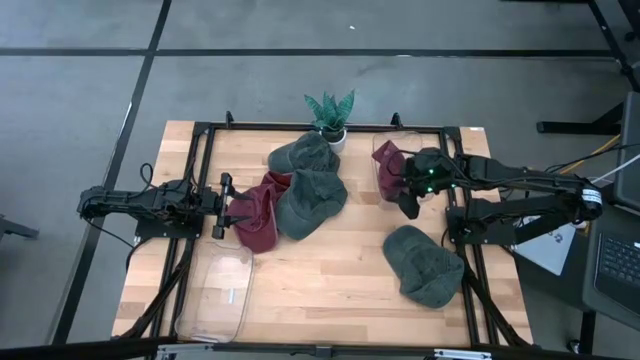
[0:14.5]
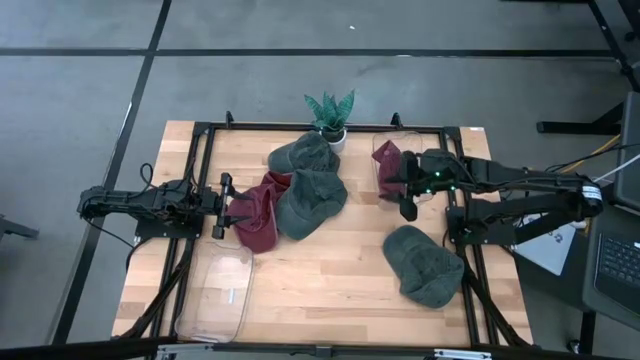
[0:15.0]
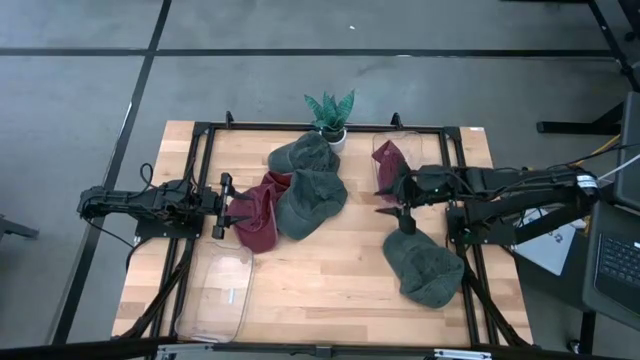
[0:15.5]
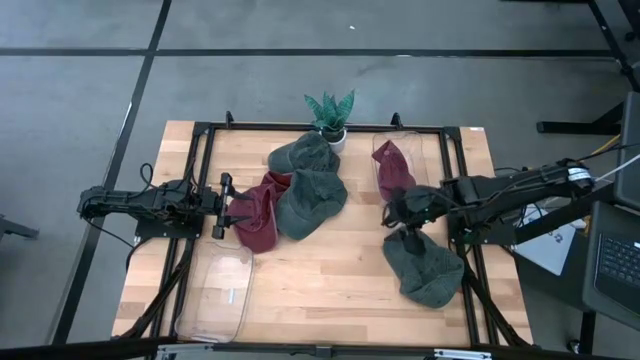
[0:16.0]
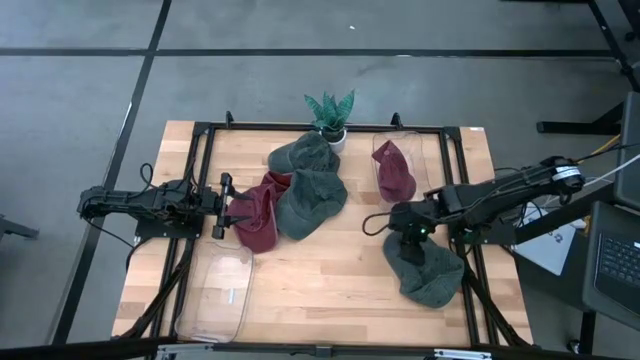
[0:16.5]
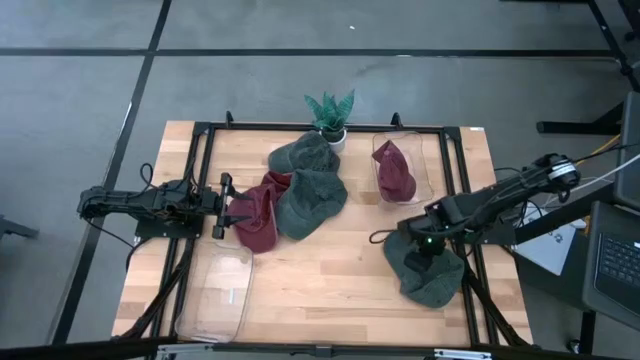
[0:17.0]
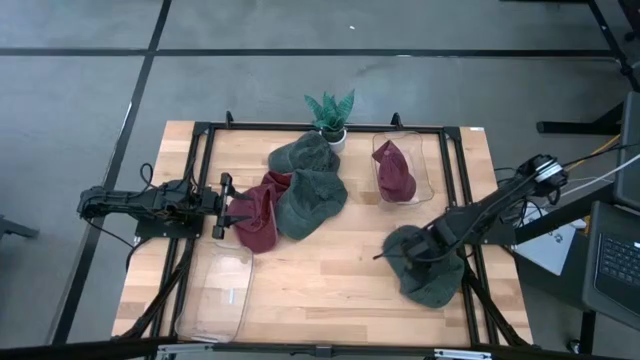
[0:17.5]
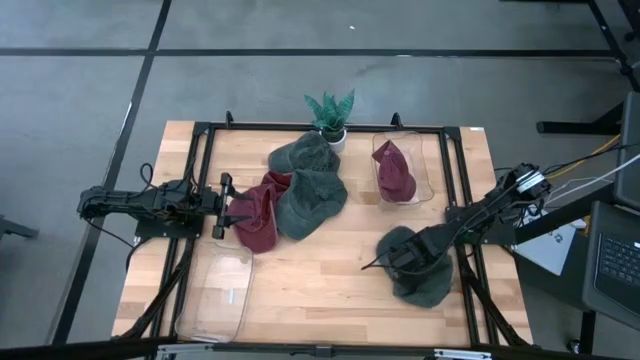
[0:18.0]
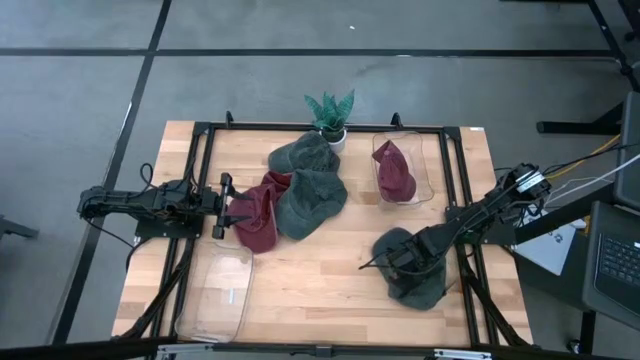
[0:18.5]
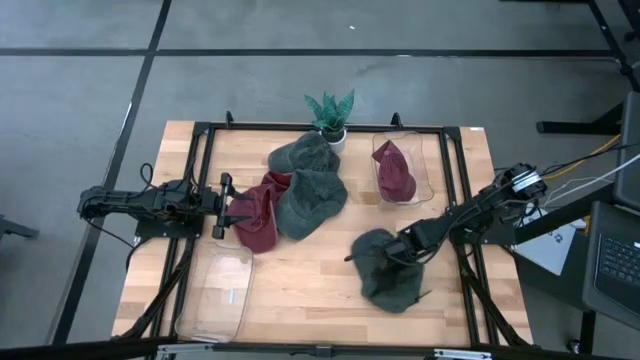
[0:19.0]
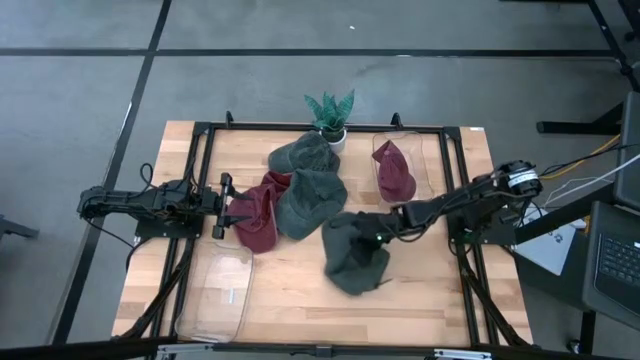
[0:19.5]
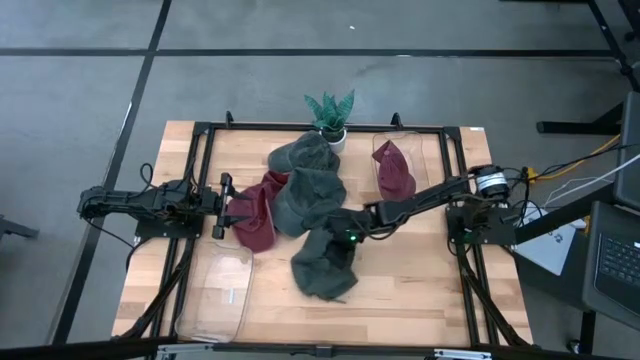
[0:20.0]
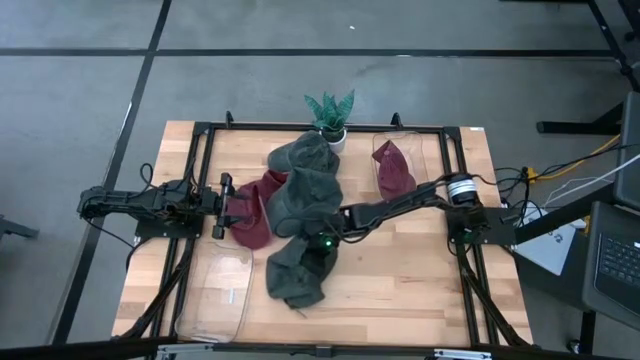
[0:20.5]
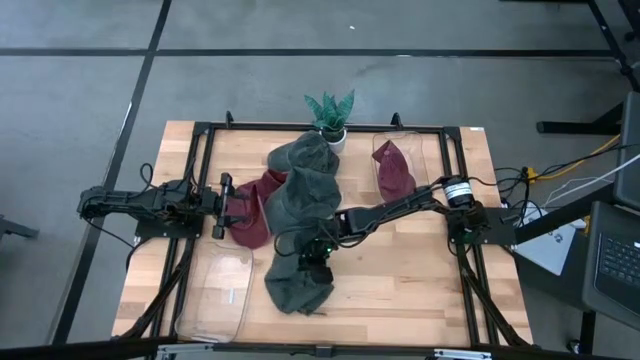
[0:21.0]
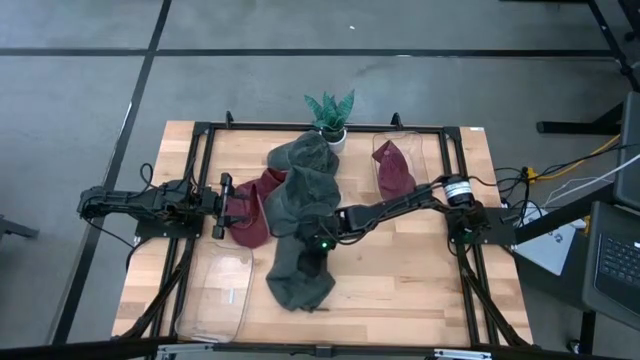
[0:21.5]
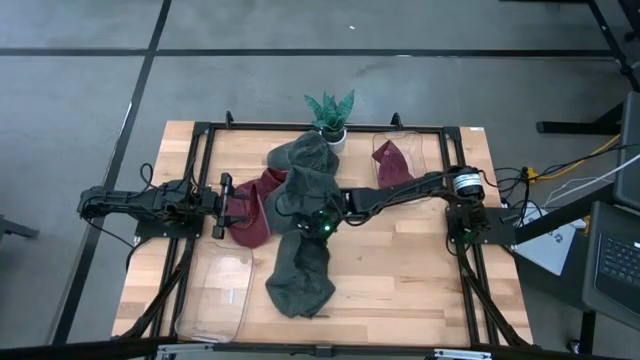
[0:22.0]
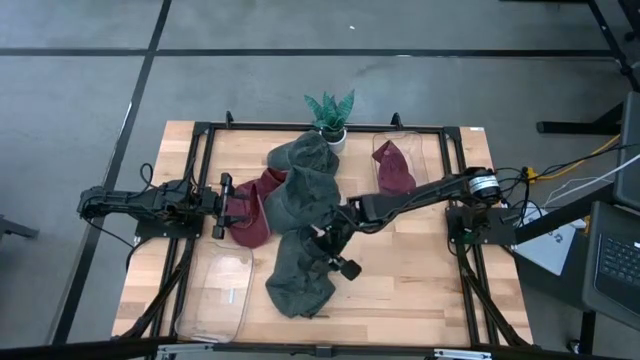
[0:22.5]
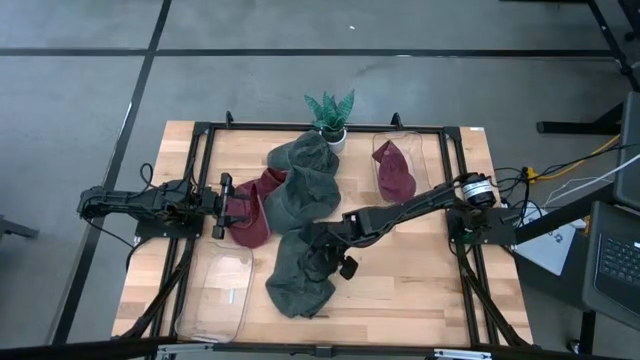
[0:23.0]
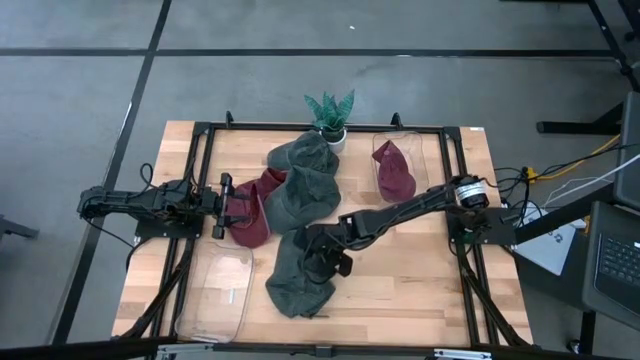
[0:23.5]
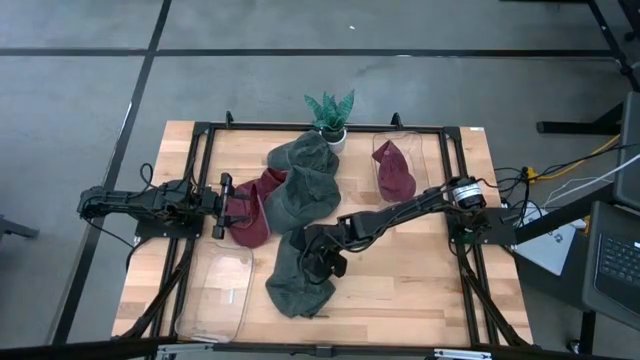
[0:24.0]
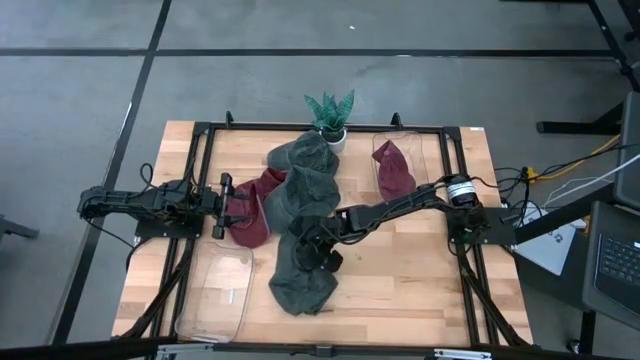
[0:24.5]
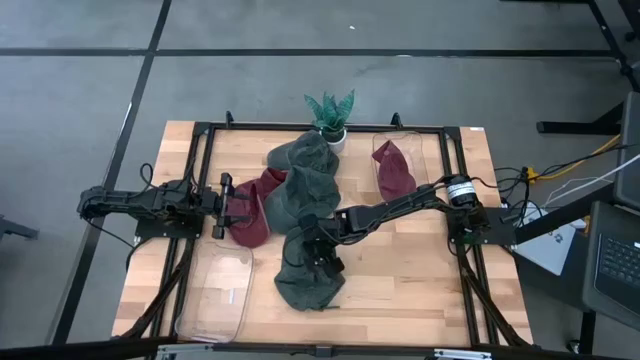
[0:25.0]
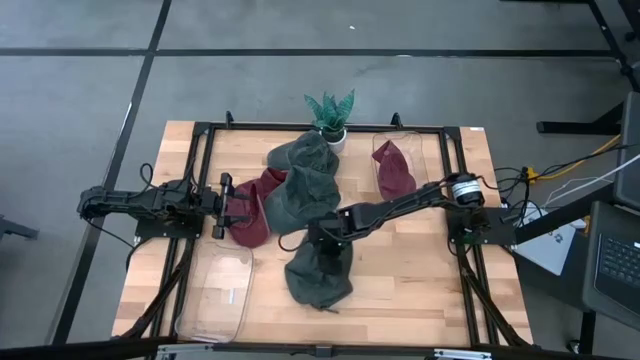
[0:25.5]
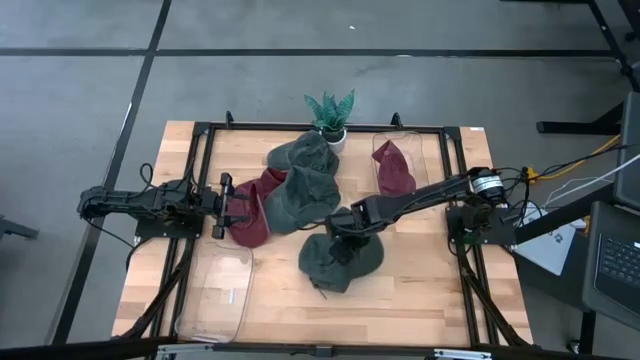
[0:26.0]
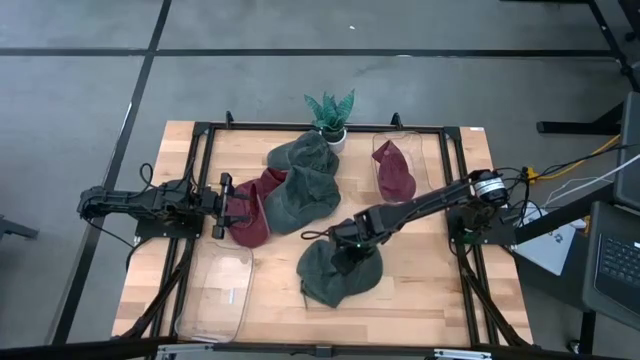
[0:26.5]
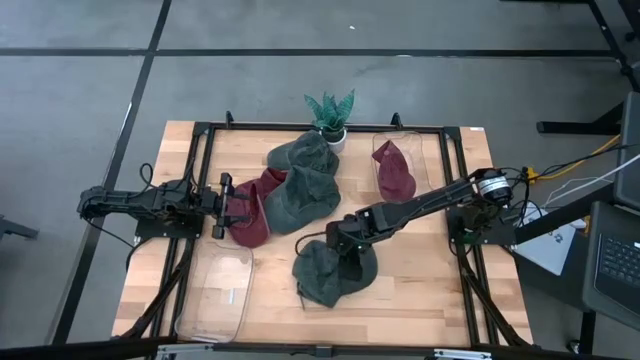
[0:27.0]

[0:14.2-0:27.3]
Task: Pick & Place hat
Put the bottom gray cap into the bottom left transparent bin

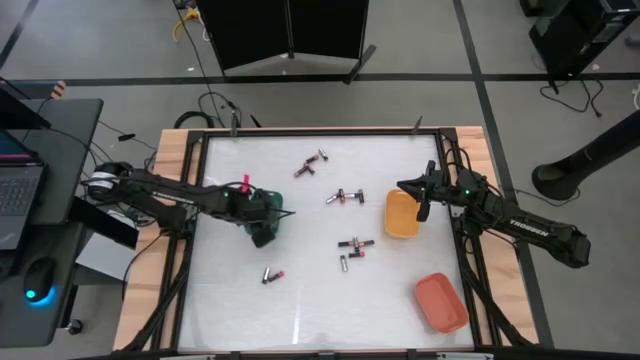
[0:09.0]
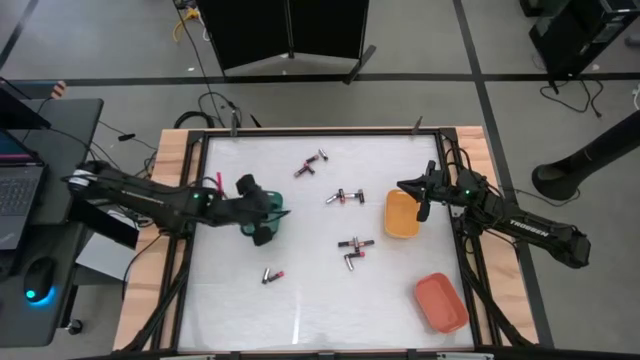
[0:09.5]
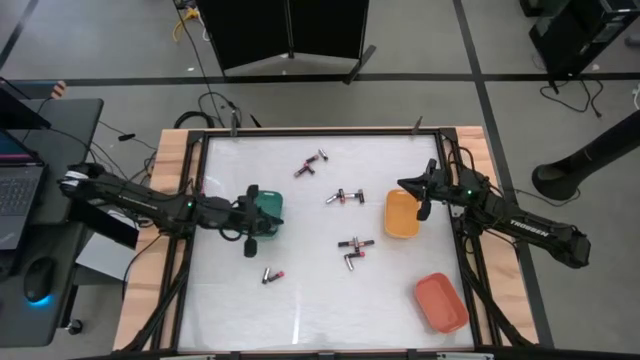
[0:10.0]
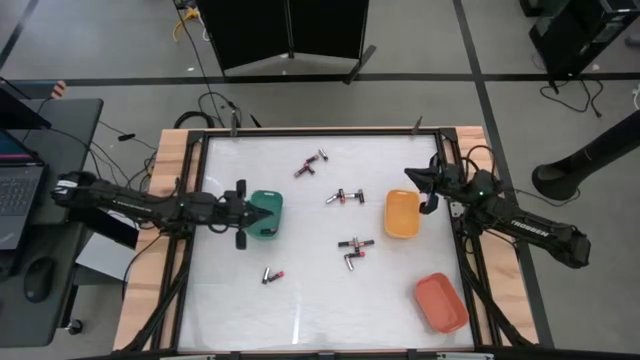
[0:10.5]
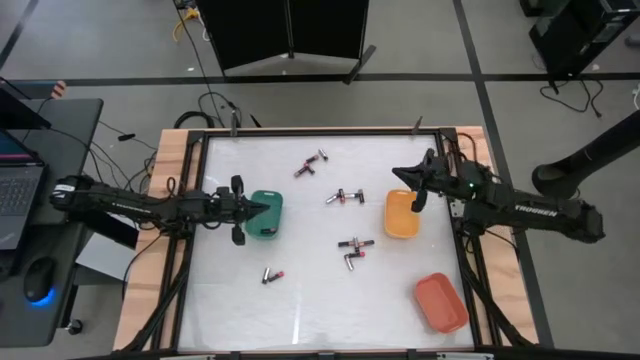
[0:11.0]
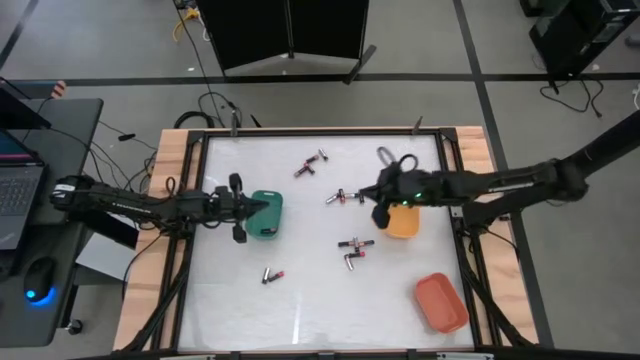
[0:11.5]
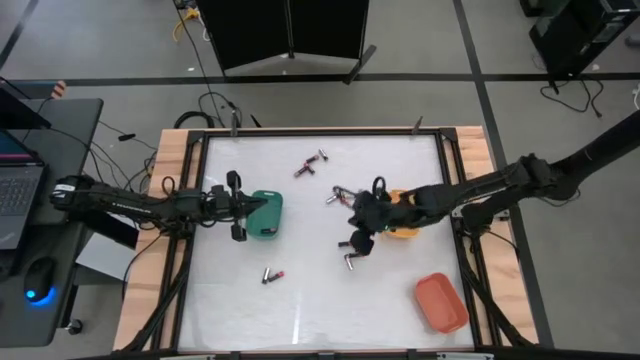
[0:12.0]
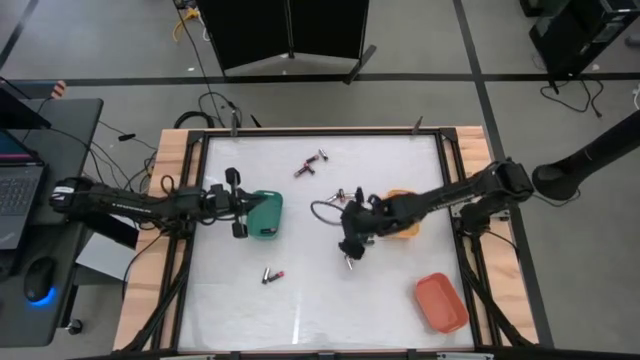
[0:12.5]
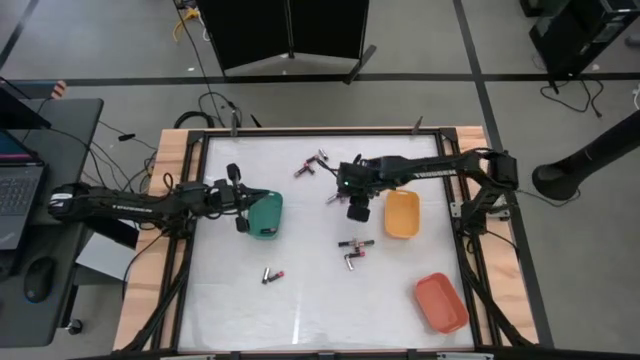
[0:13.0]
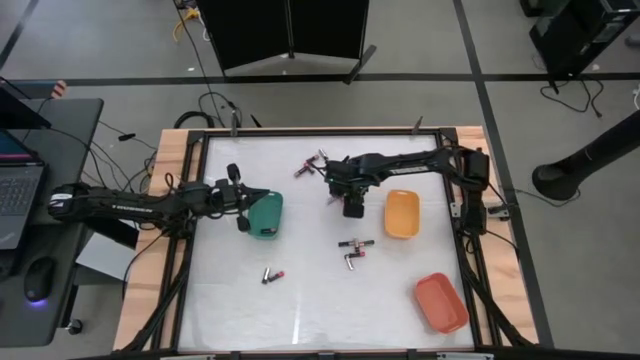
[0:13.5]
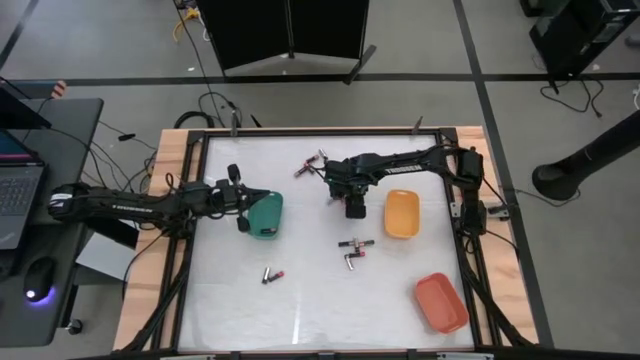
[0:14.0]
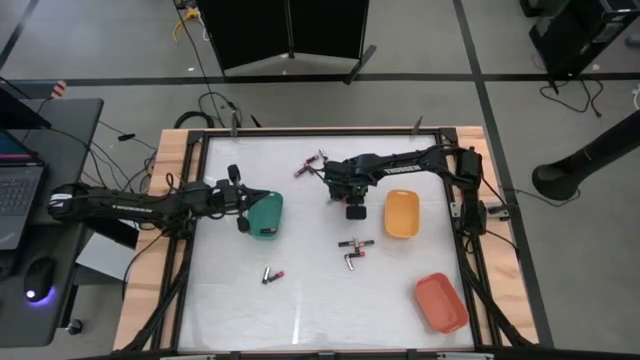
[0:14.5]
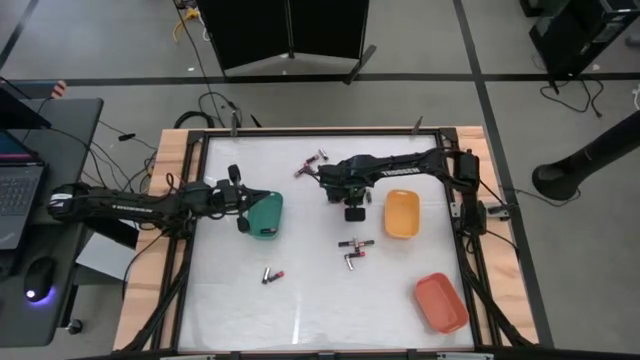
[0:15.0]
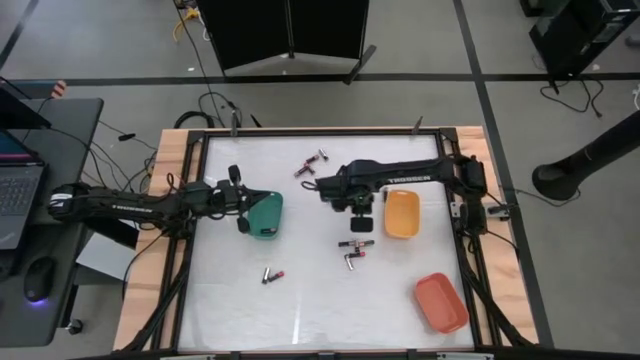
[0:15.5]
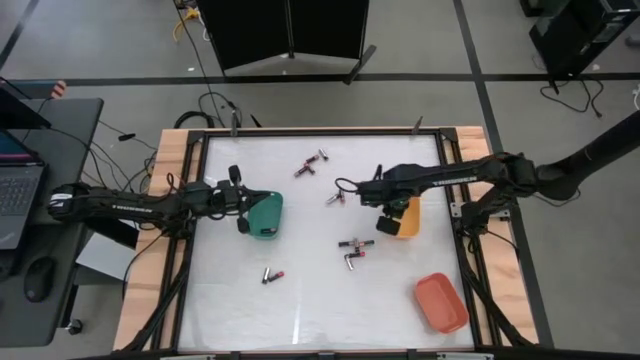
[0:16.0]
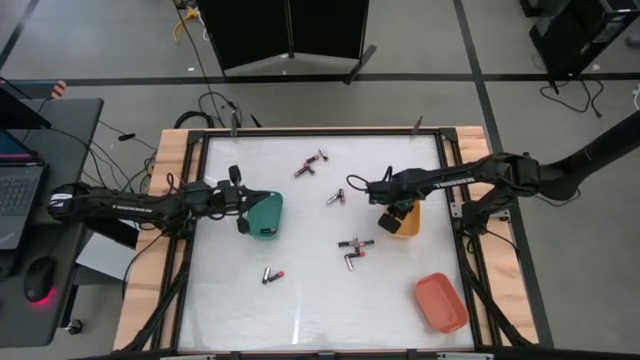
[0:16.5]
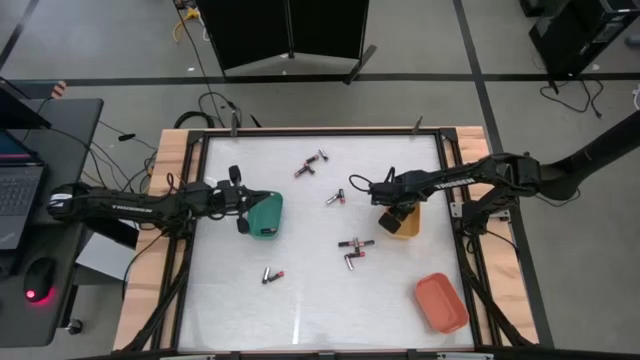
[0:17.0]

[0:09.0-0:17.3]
Task: Sort batteries
Put the silver battery into the yellow bin
